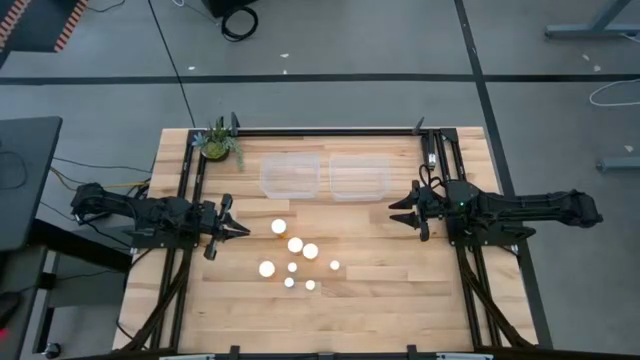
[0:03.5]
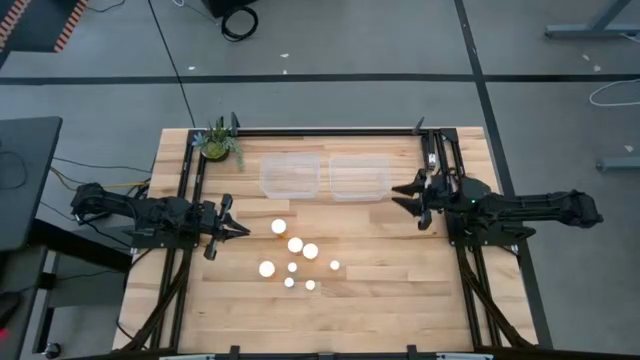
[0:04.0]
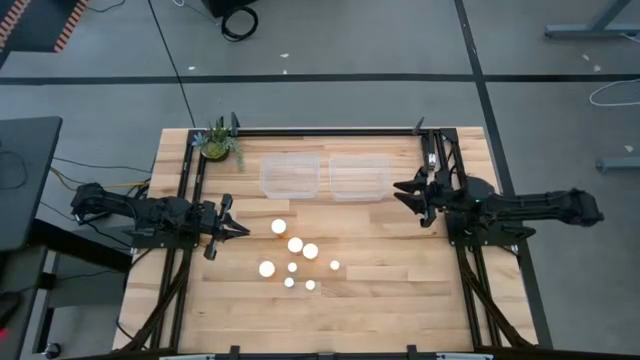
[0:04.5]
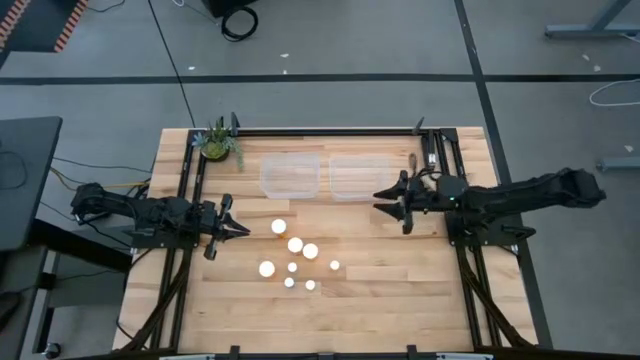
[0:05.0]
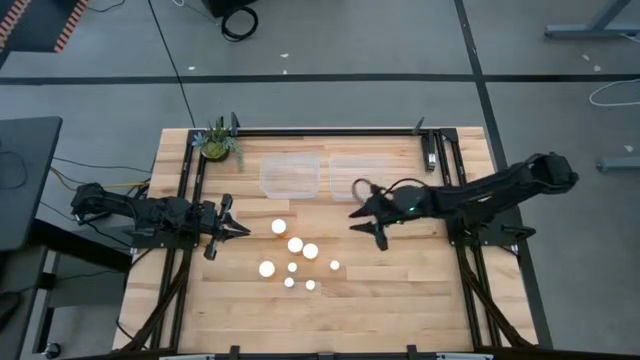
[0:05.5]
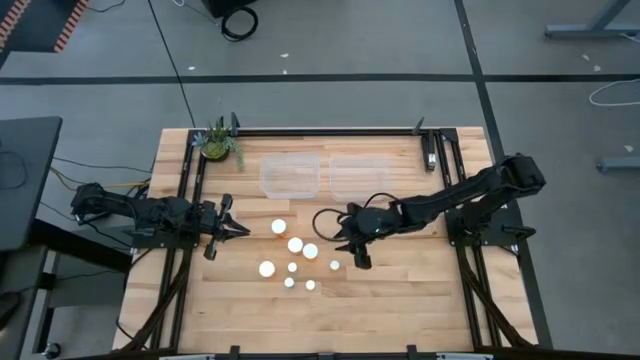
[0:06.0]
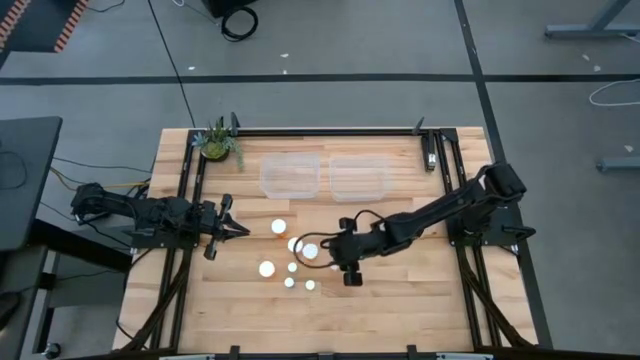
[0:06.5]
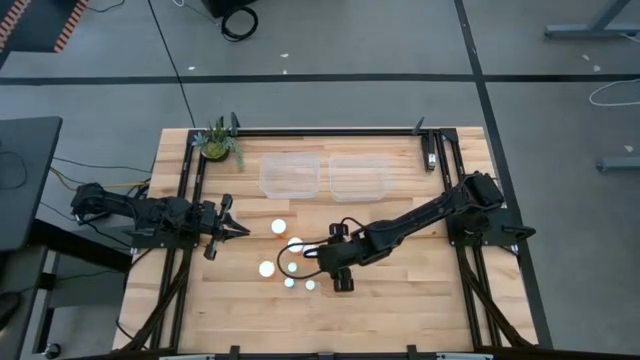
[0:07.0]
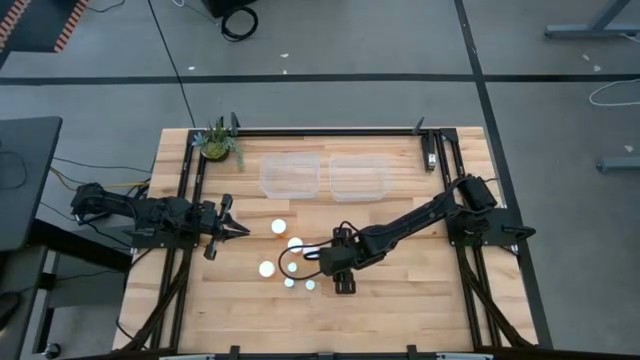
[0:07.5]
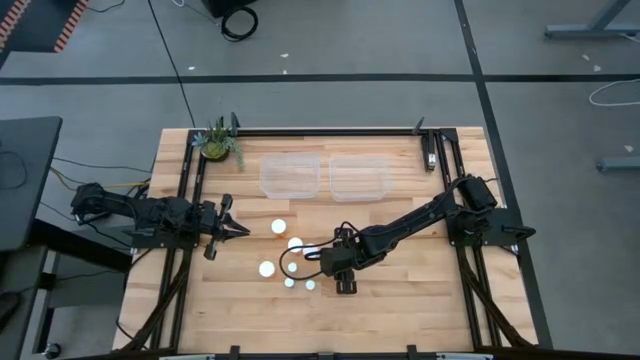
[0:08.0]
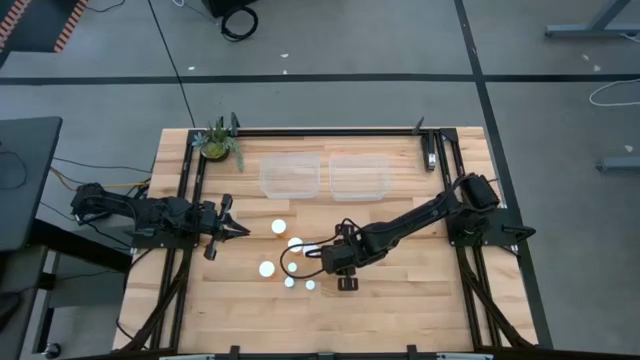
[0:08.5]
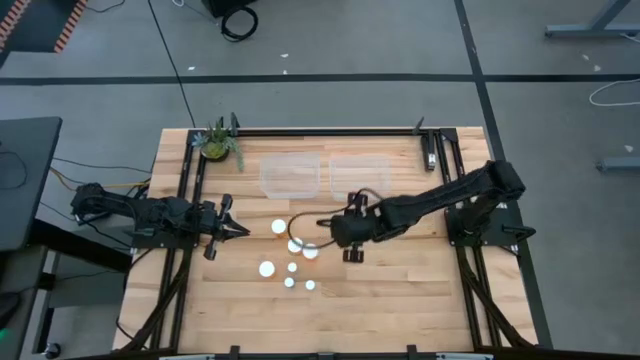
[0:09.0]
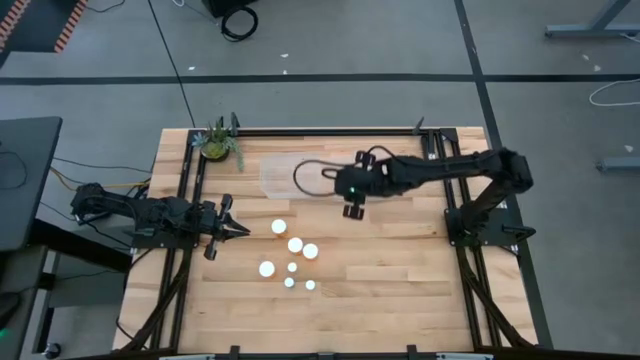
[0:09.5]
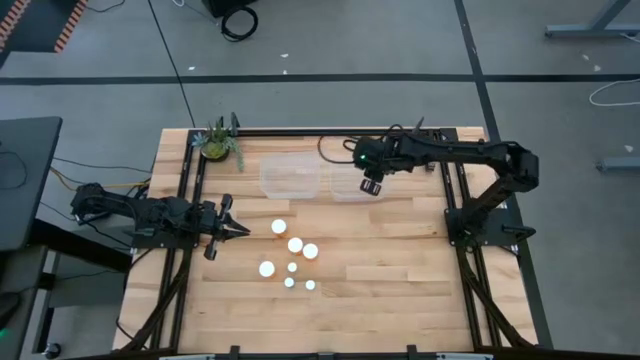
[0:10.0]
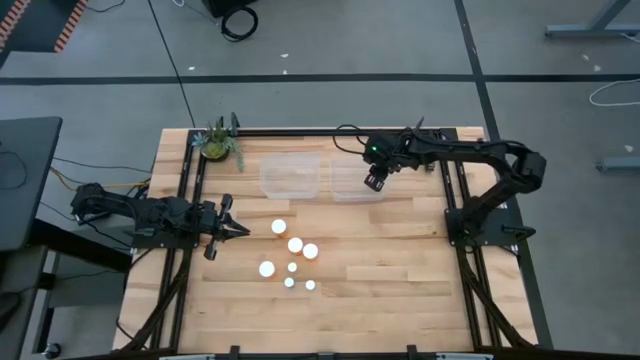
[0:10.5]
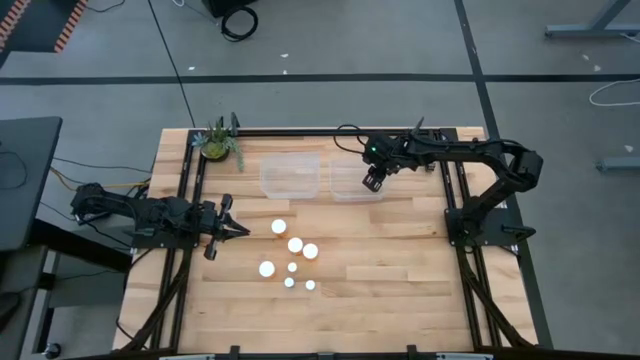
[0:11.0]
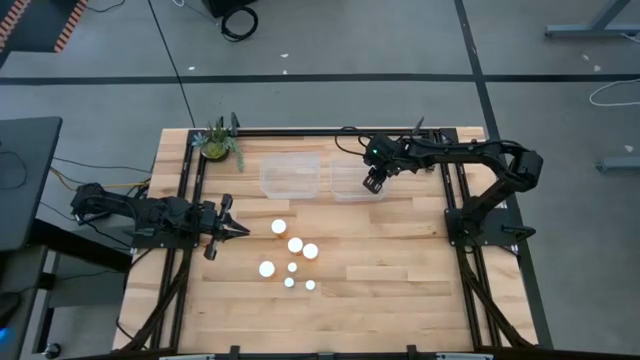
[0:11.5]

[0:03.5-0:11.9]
Task: Pick and place medicine bottles into bin by pill shape (circle, oval)
Put the small orange pill bottle into the right transparent bin

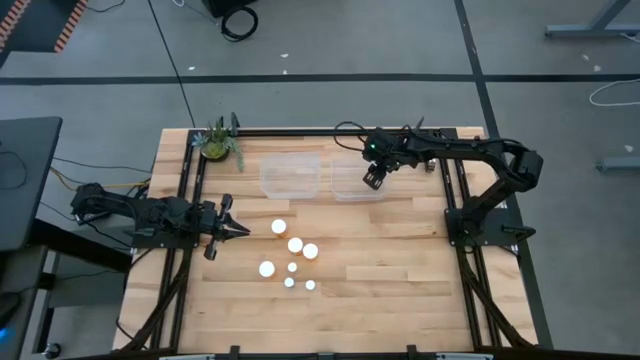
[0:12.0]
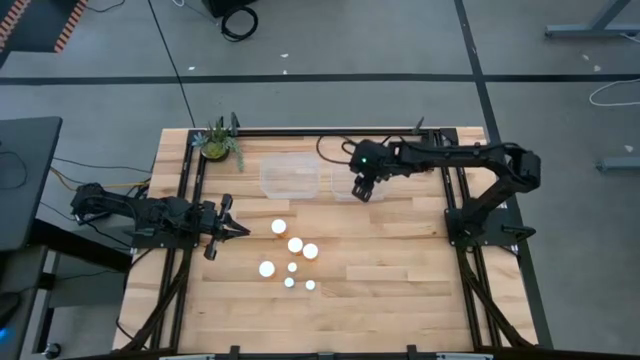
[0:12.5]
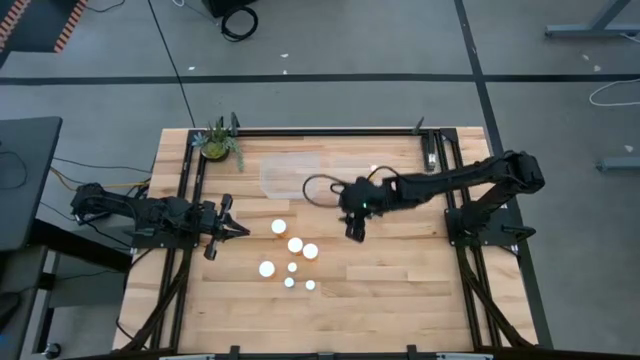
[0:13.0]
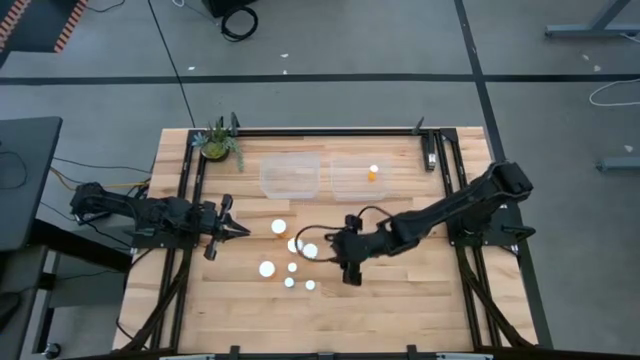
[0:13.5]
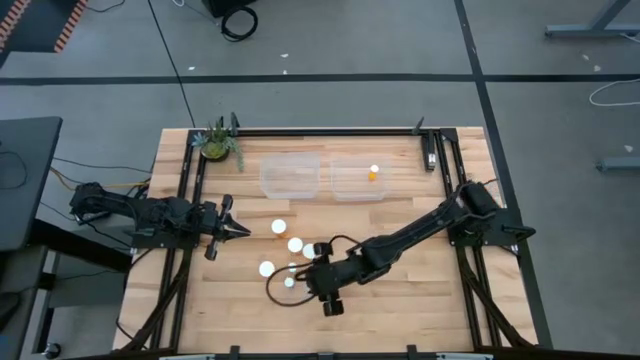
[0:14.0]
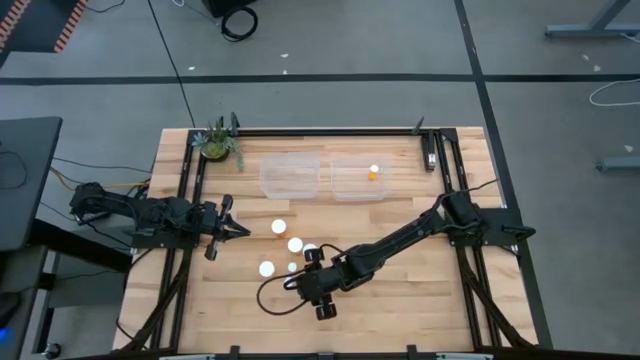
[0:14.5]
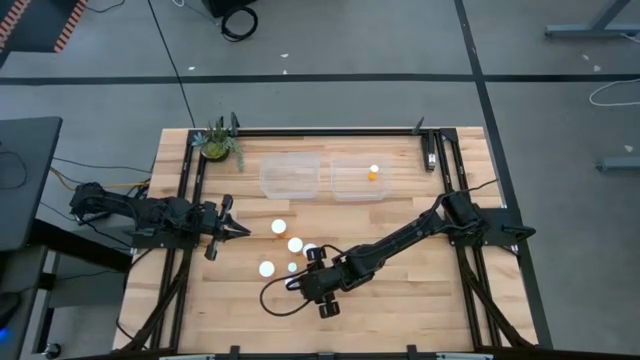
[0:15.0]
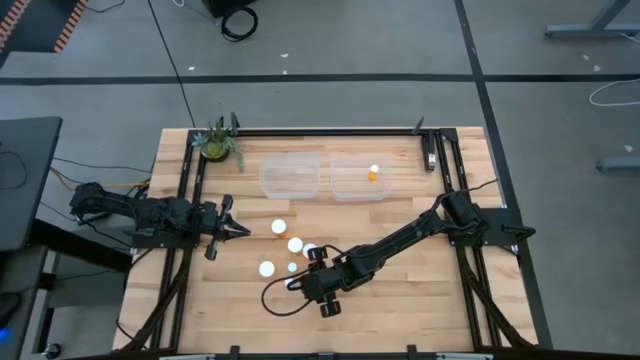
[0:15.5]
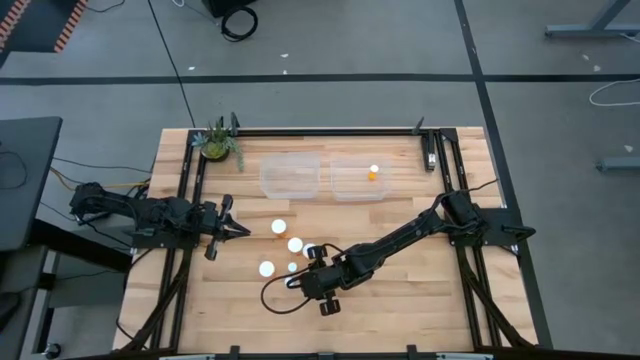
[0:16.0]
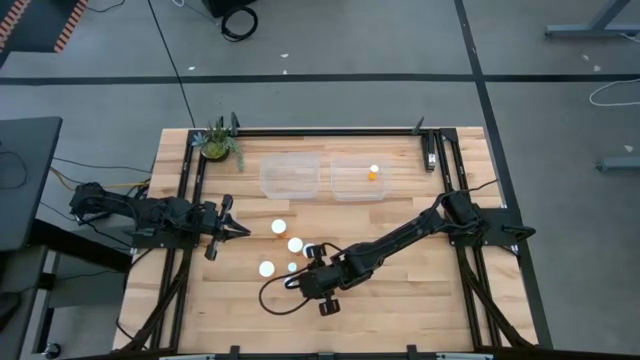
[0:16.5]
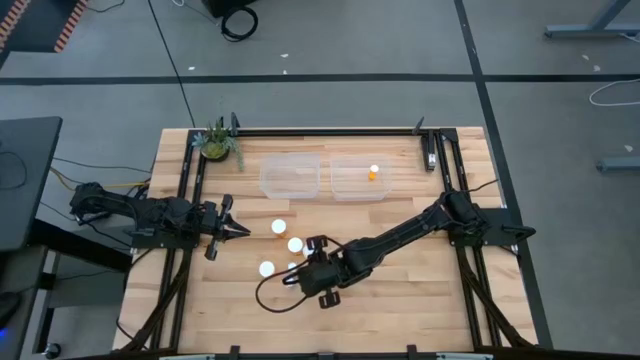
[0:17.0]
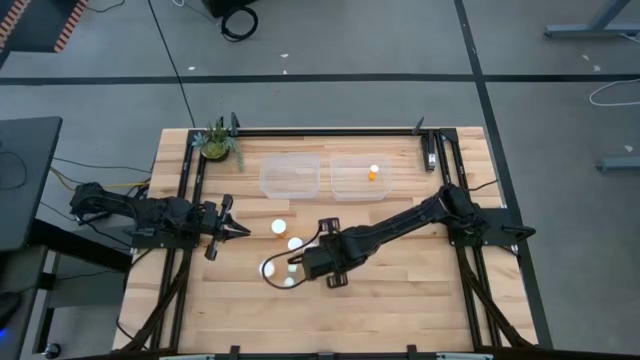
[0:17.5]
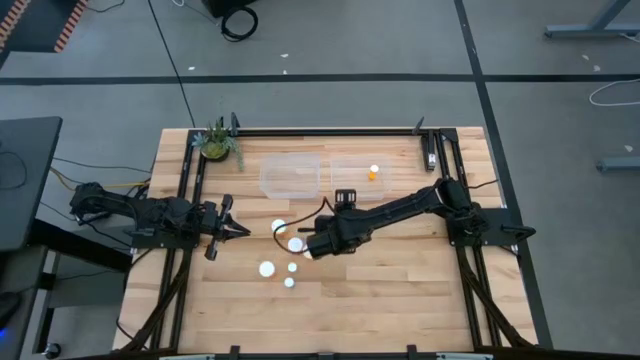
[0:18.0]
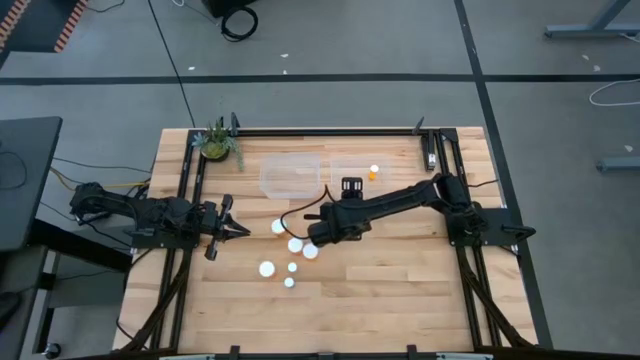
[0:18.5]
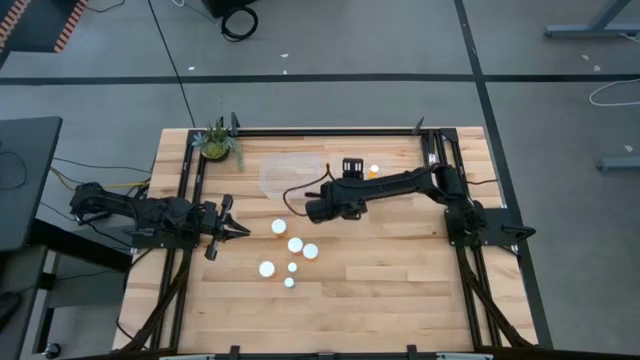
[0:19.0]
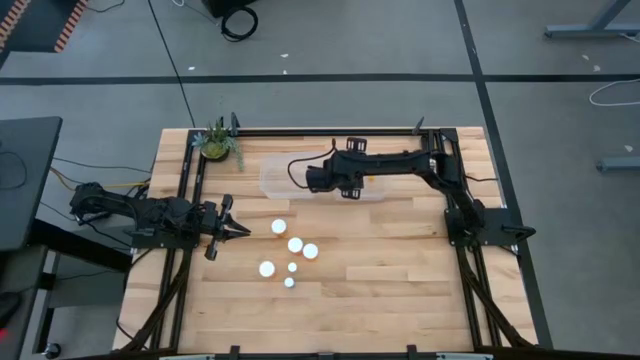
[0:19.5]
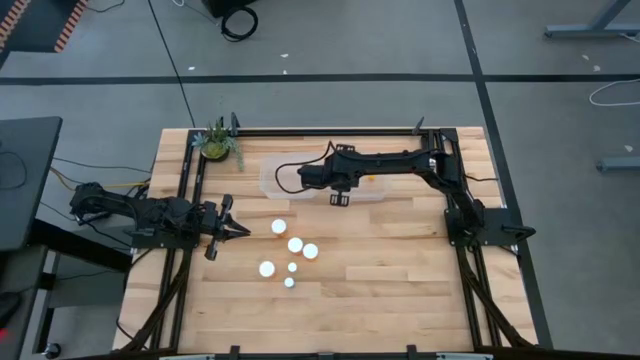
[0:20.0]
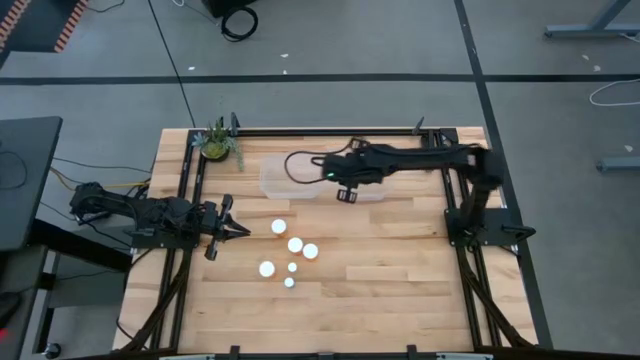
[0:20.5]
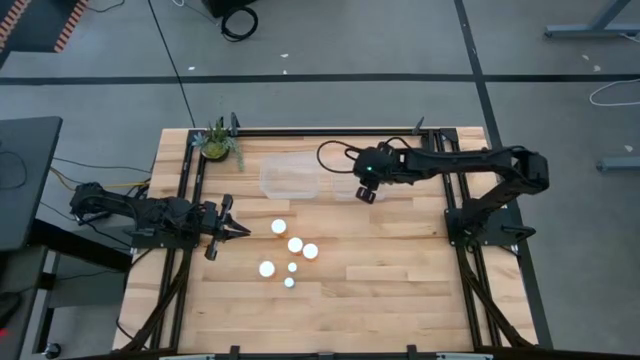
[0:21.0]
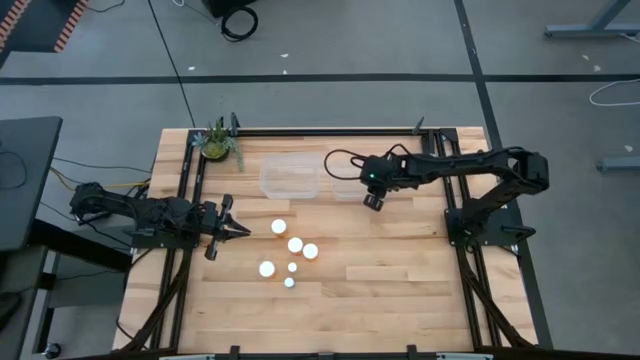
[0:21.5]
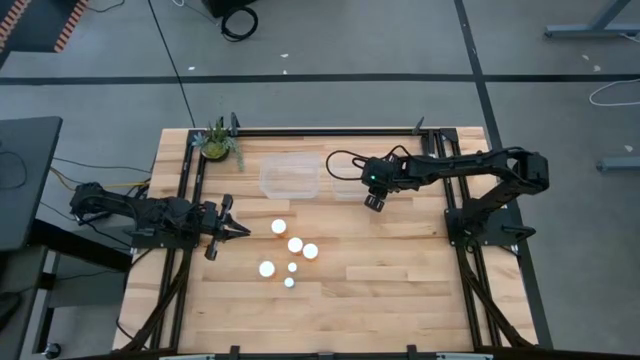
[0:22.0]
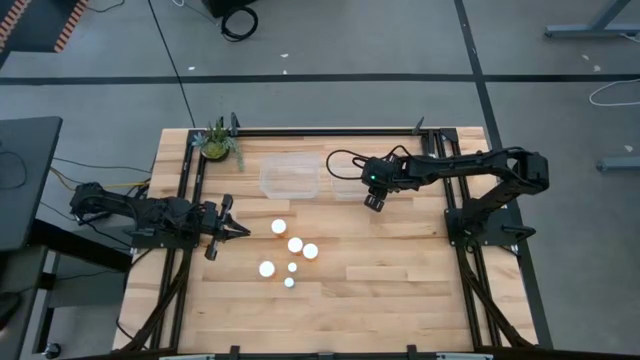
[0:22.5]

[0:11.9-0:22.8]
Put the small yellow pill bottle into the right transparent bin

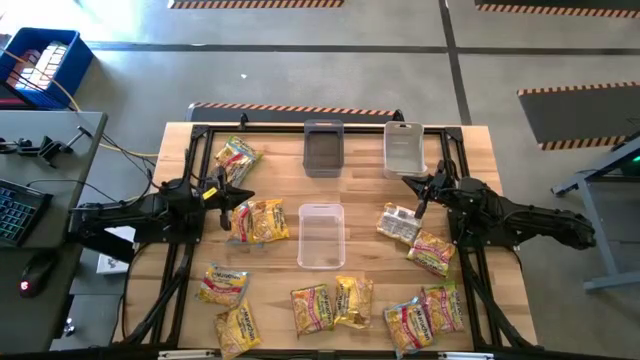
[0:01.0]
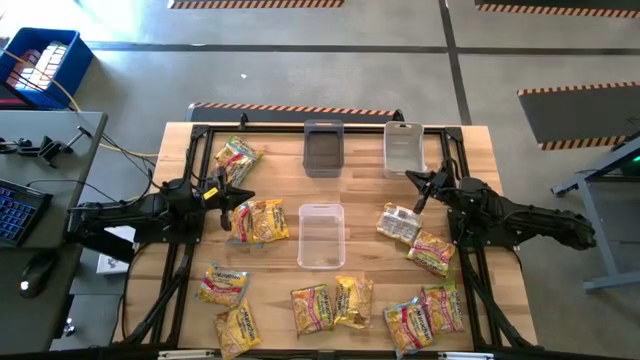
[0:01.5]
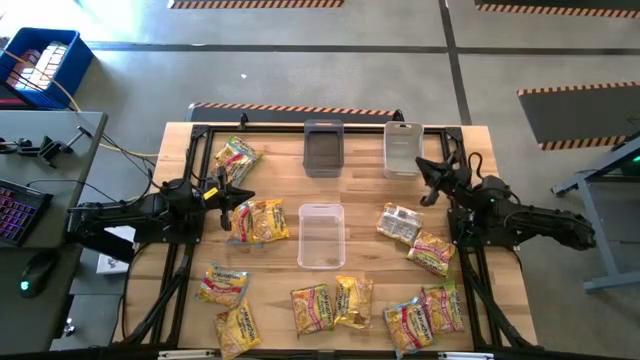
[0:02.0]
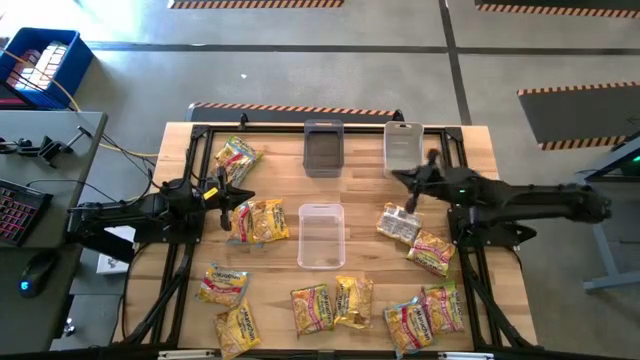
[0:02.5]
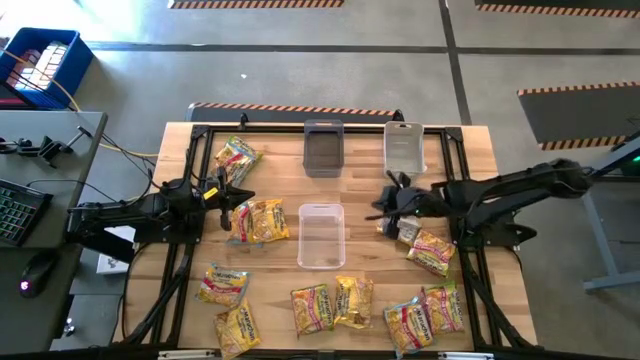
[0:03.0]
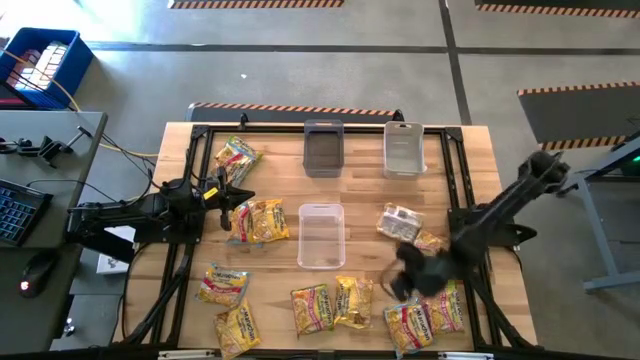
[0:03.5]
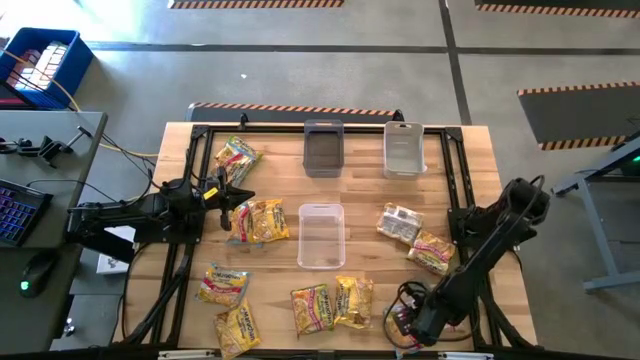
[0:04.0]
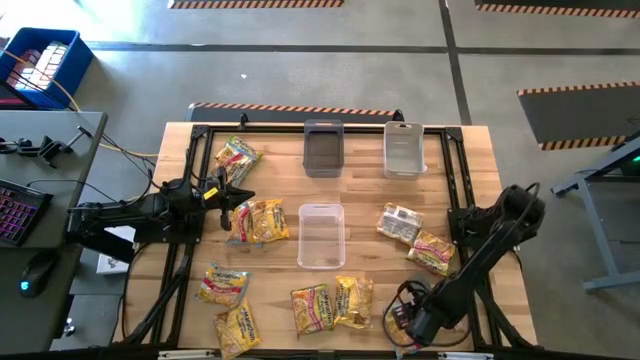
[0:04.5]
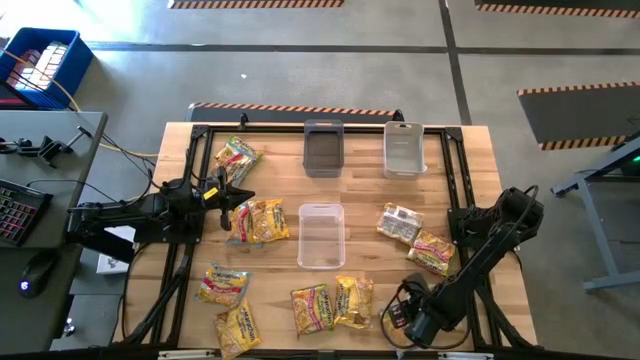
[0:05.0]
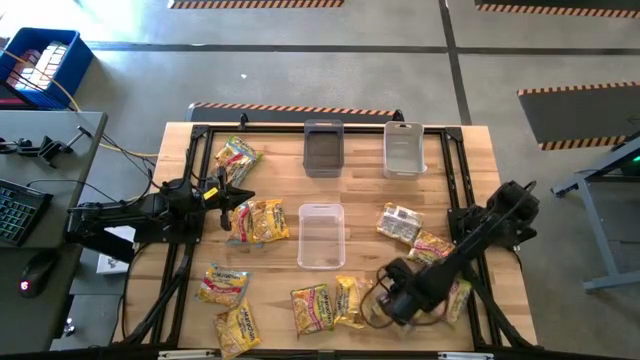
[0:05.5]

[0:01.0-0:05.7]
Task: Sort Maruchan noodles
Put the blue noodle pack into the white bin
